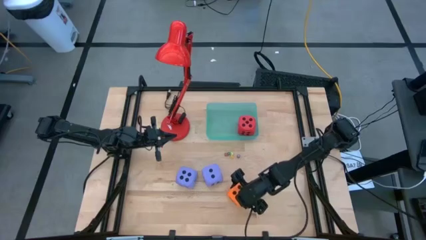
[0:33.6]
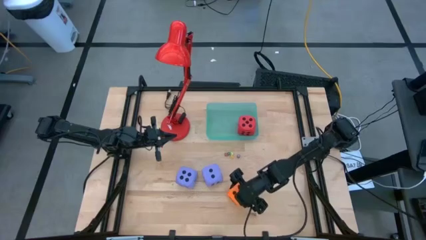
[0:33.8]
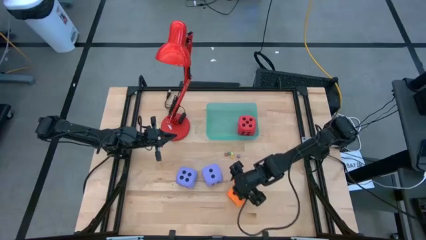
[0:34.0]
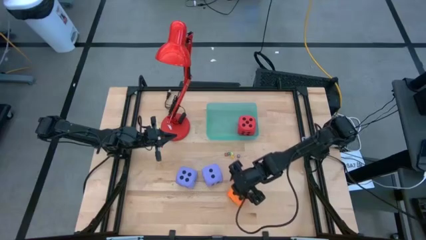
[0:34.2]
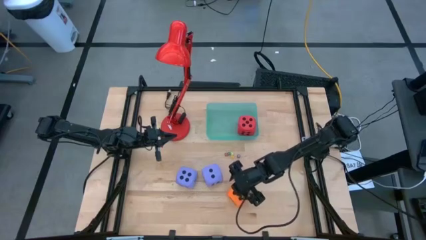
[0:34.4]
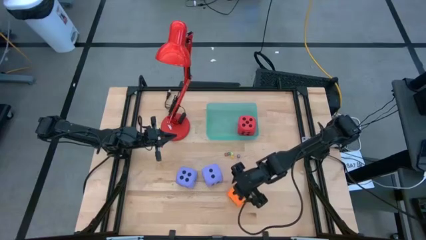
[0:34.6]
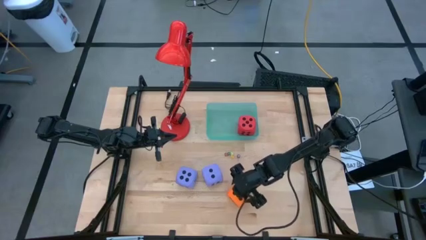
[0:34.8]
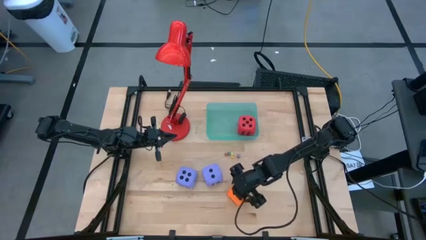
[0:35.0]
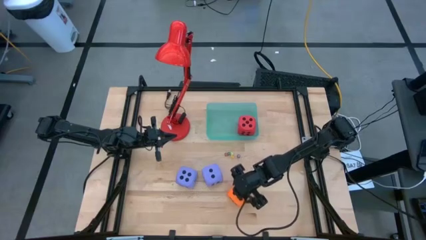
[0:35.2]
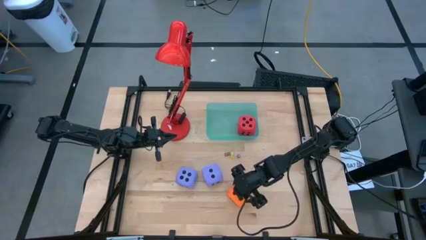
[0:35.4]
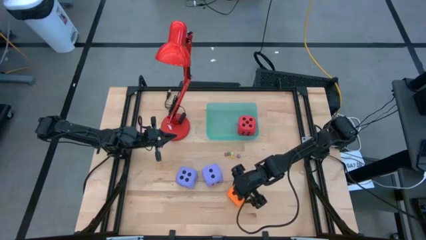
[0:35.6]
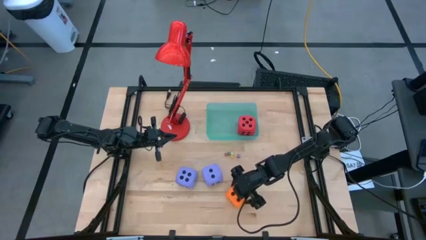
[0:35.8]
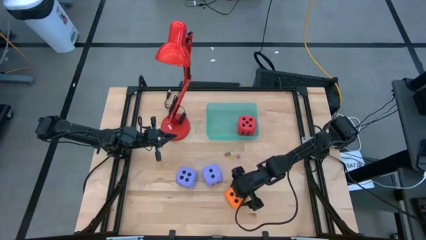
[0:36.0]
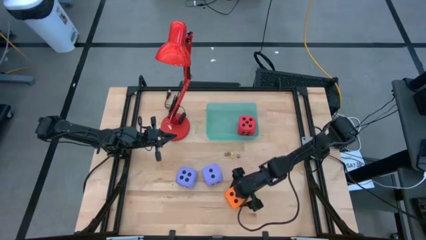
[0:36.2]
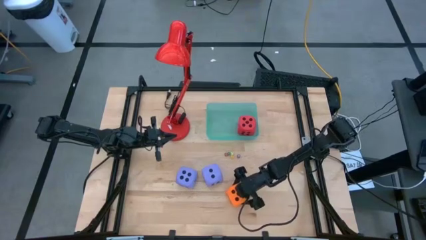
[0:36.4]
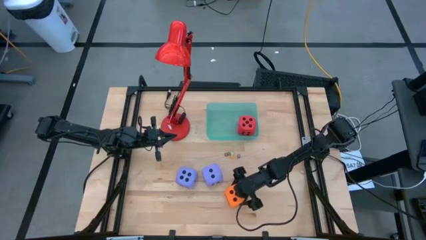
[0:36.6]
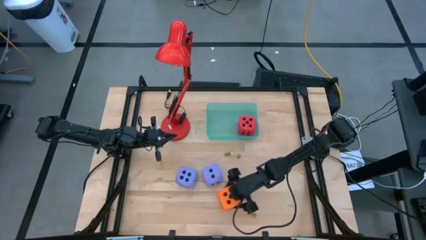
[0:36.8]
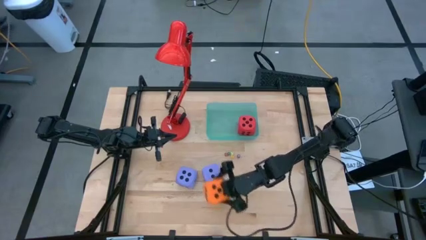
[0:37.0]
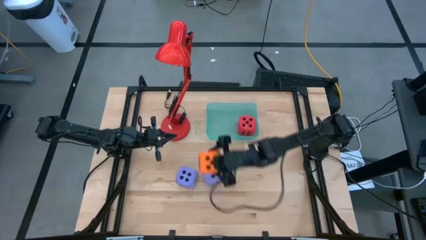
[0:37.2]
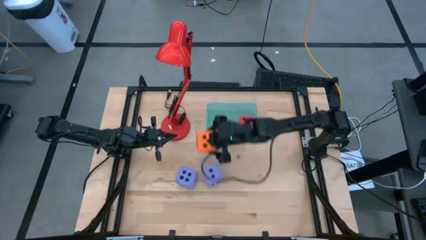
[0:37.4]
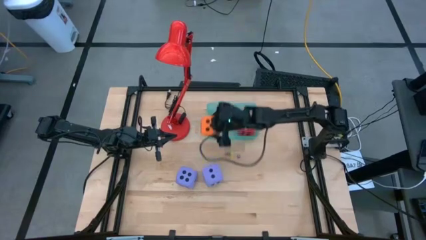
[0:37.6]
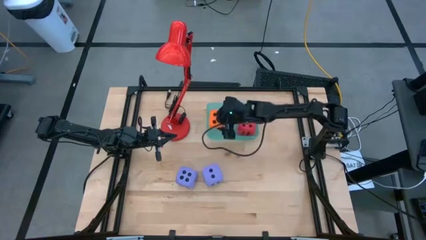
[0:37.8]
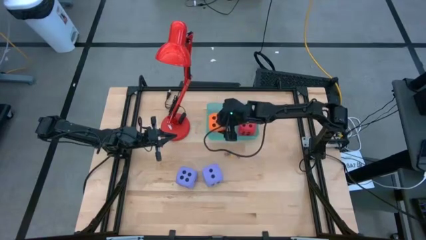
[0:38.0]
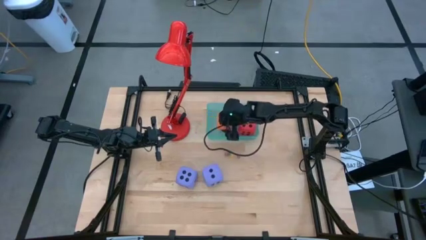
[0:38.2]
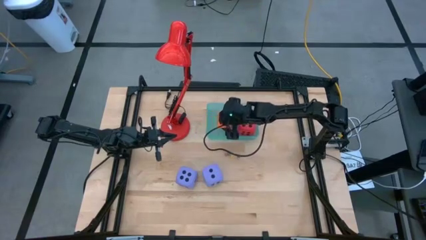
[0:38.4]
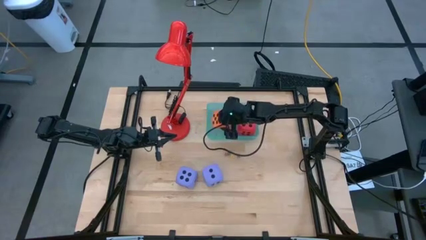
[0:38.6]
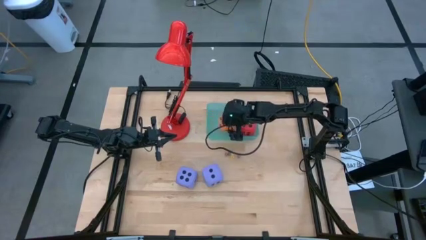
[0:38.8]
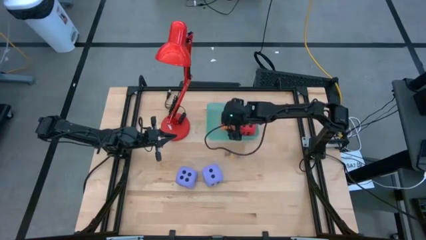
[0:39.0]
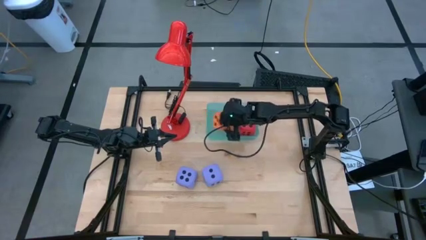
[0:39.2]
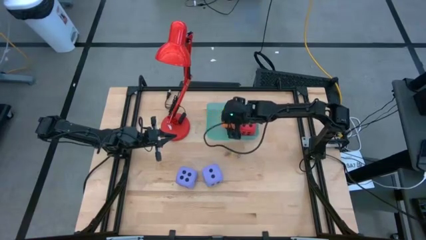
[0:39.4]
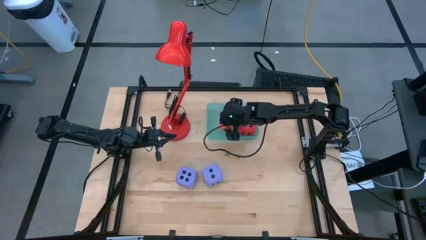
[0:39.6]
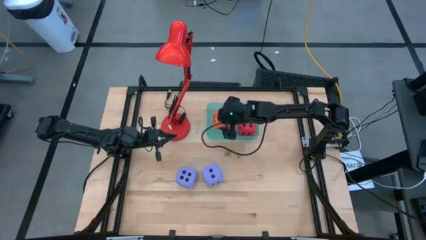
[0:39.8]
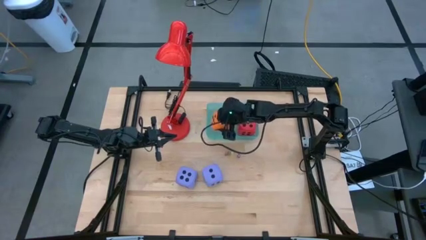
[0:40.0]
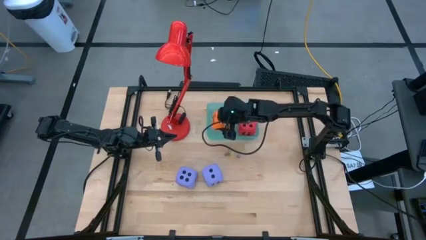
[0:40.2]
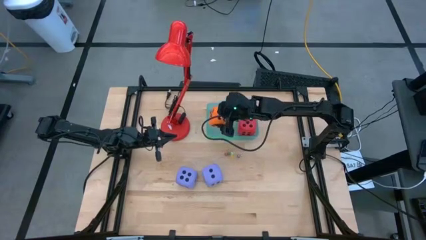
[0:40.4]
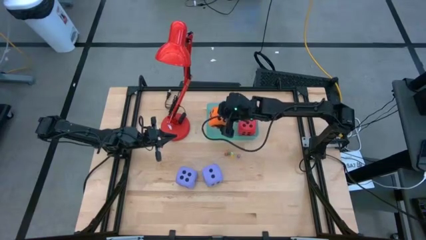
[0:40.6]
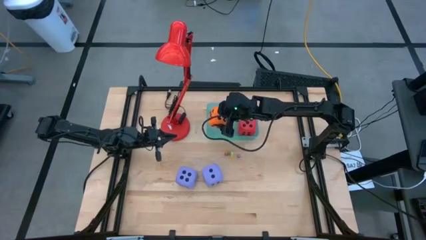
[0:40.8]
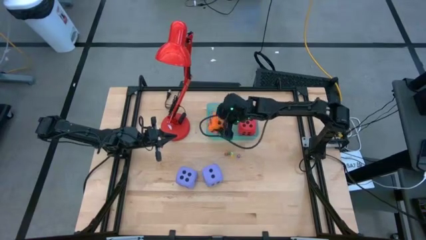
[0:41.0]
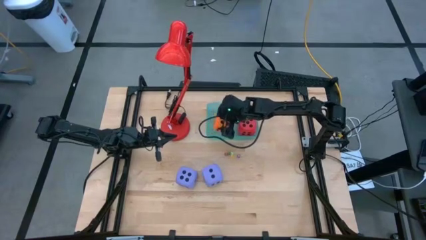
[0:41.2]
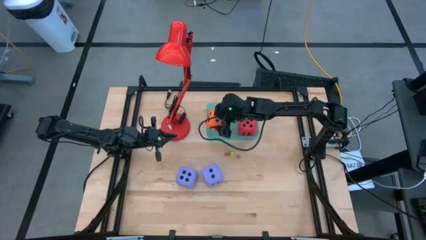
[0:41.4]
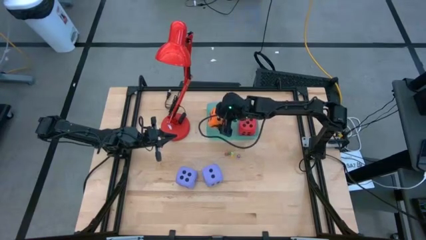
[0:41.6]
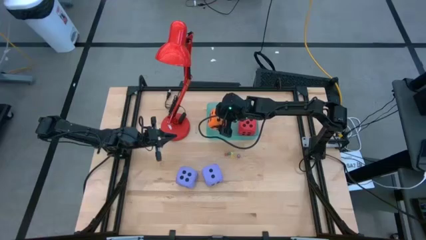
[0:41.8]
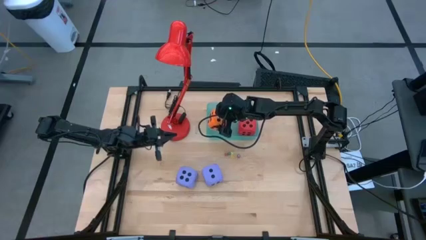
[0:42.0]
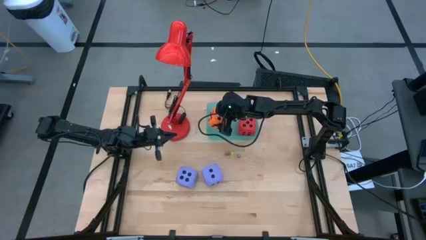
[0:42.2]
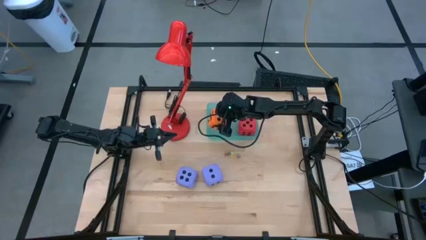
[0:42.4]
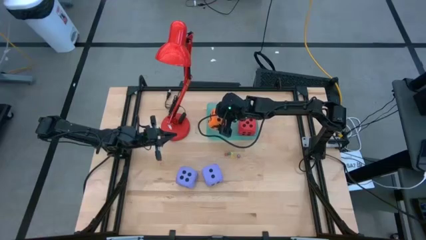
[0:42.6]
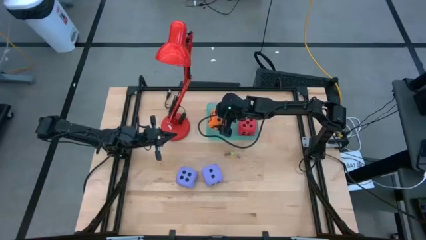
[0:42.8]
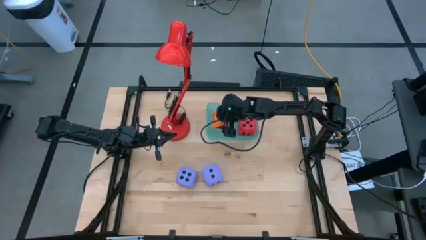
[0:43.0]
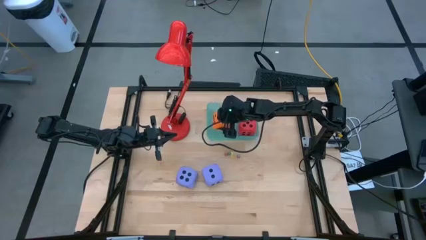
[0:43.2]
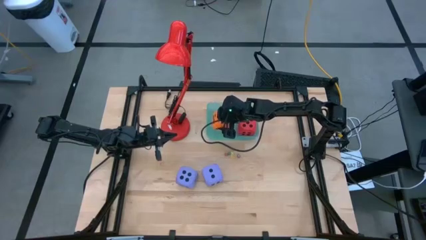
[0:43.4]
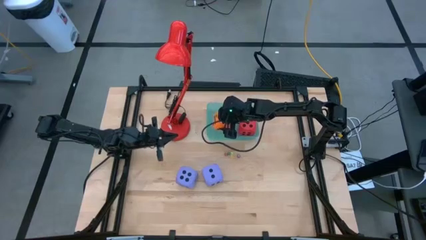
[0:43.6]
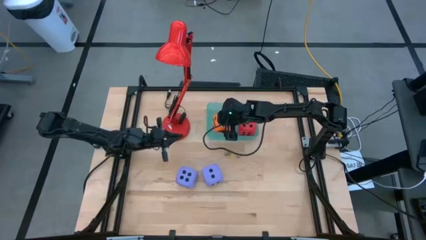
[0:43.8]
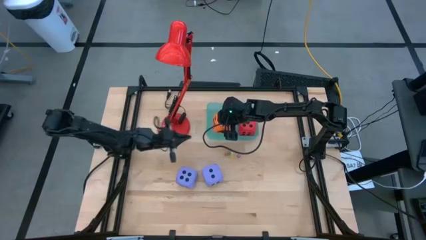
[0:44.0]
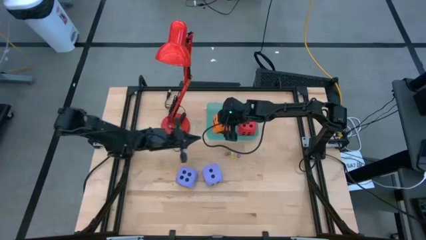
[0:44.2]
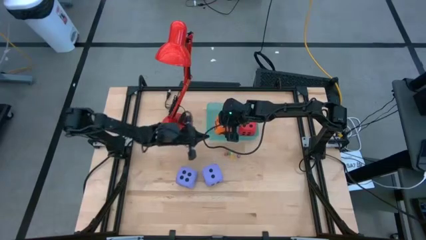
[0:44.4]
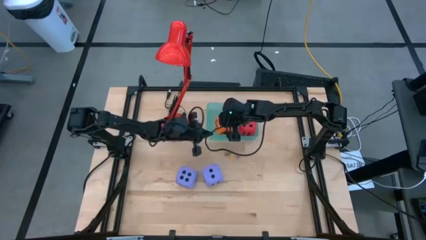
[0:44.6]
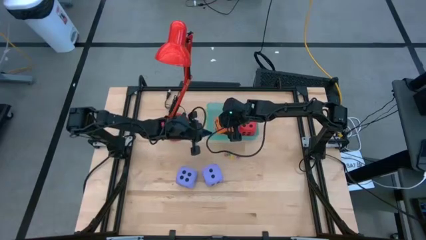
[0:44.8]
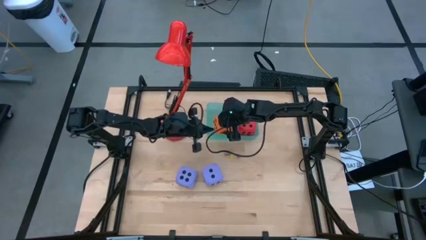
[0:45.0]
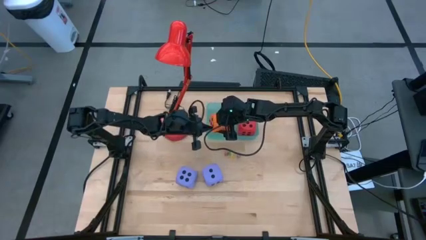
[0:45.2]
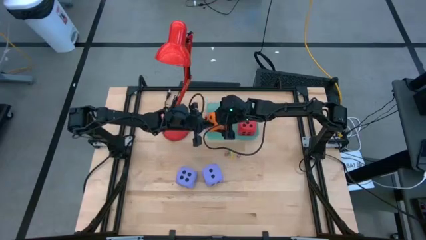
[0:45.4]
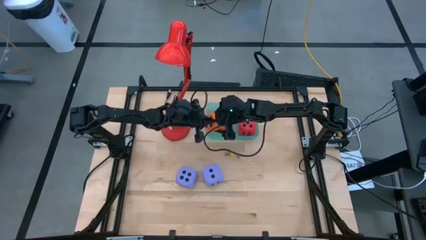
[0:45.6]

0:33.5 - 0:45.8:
Task: Pick & Place Dice
Put the large orange dice into the bin

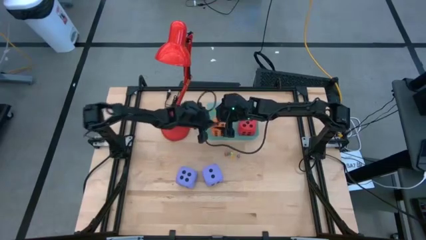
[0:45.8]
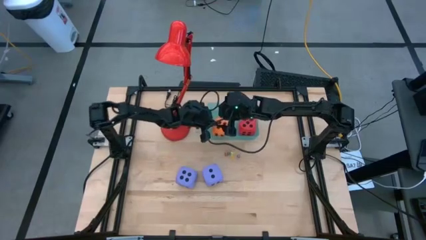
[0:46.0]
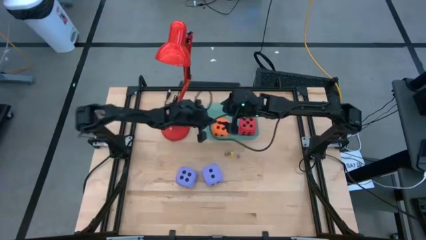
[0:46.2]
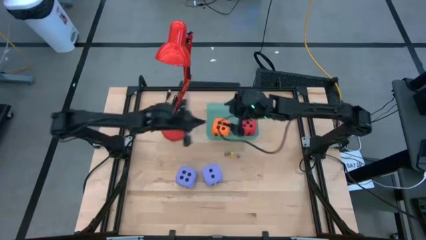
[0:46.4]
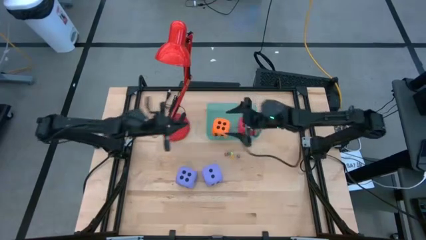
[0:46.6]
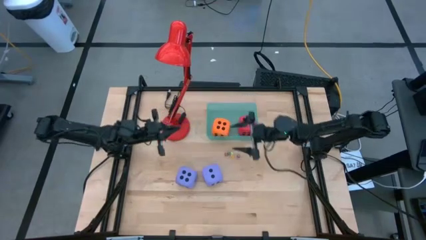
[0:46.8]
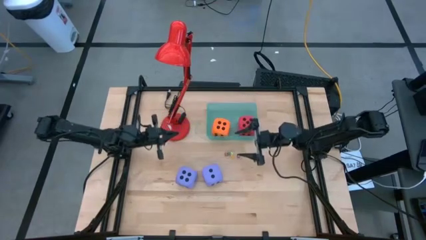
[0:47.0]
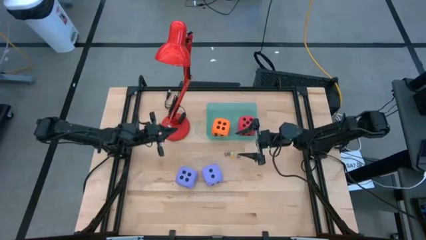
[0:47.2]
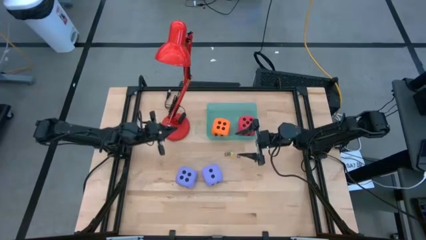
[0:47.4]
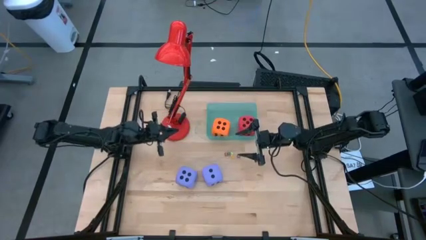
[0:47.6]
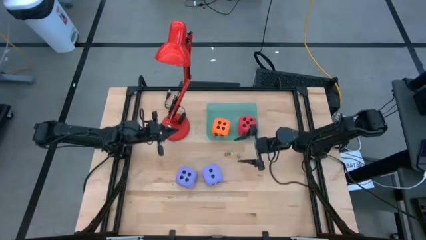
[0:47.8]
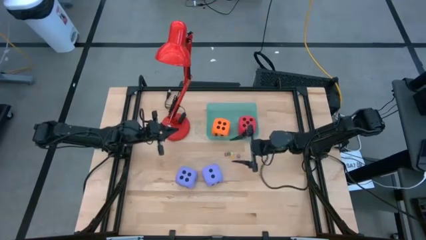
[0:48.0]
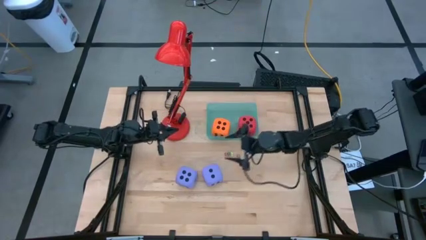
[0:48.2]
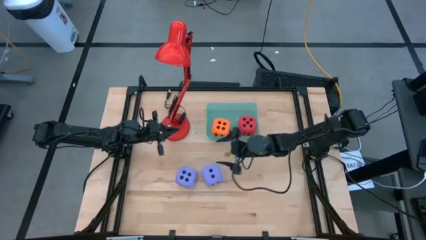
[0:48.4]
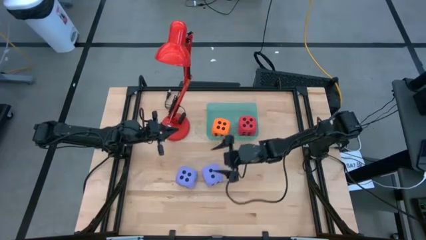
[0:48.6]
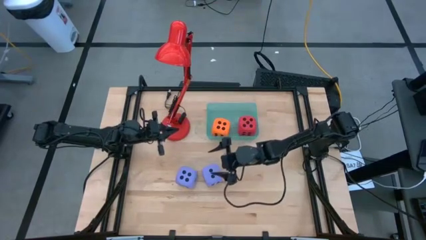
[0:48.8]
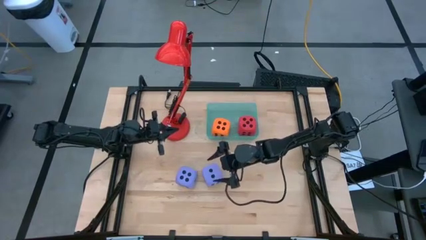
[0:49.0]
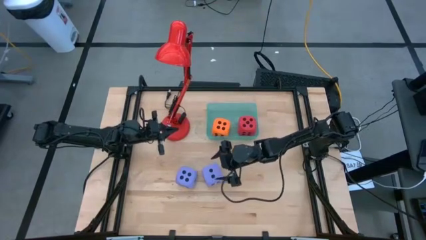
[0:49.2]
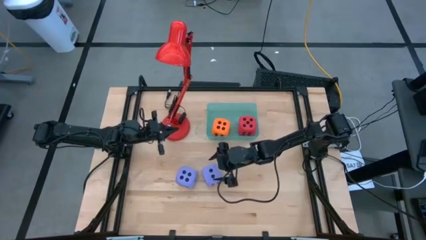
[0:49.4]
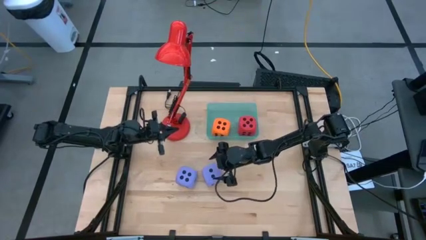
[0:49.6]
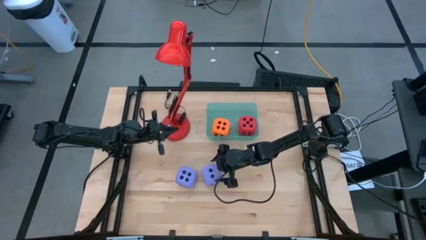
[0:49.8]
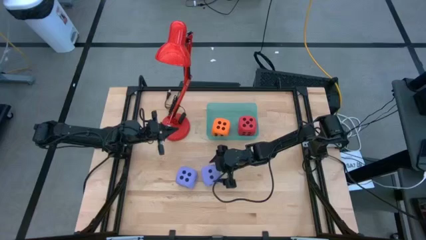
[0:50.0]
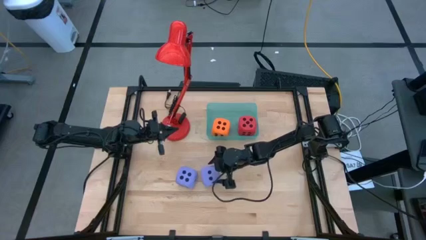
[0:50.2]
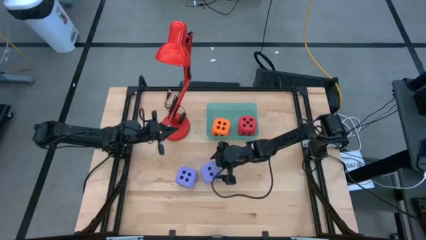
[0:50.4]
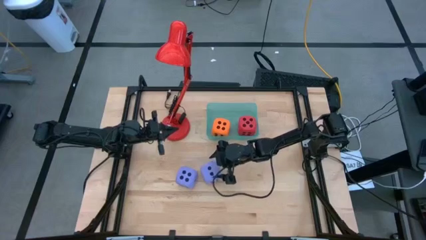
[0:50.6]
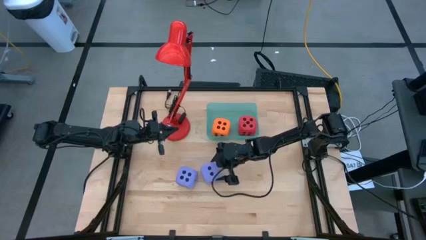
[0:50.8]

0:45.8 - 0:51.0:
Put the large right purple dice into the bin
